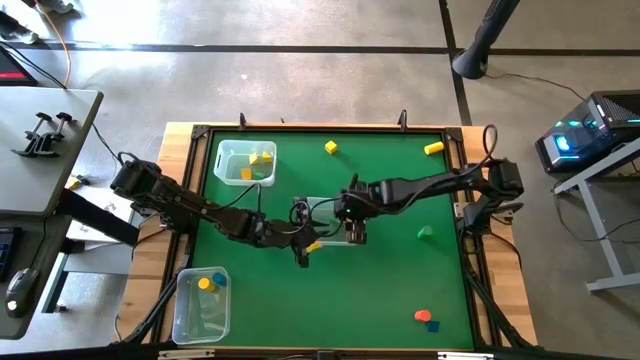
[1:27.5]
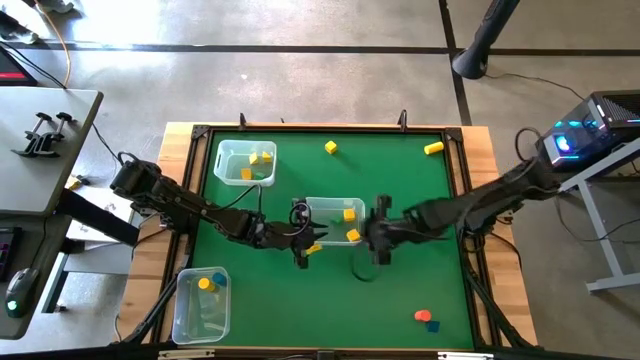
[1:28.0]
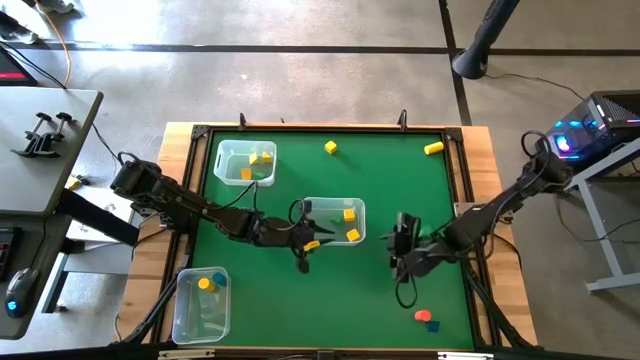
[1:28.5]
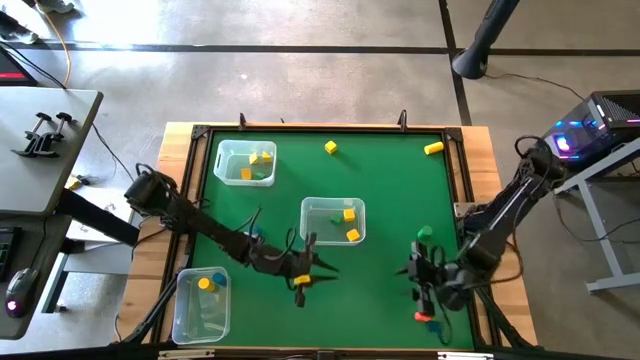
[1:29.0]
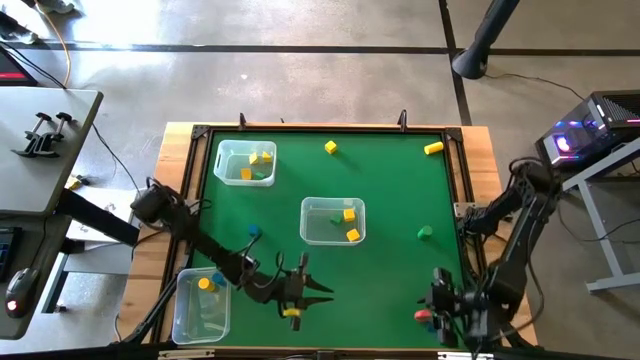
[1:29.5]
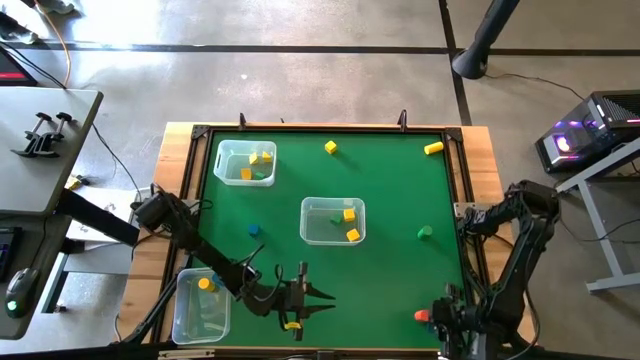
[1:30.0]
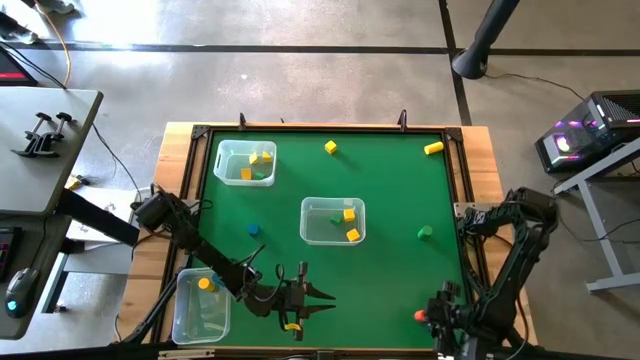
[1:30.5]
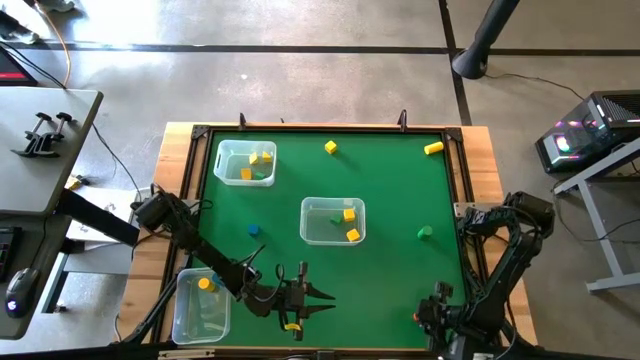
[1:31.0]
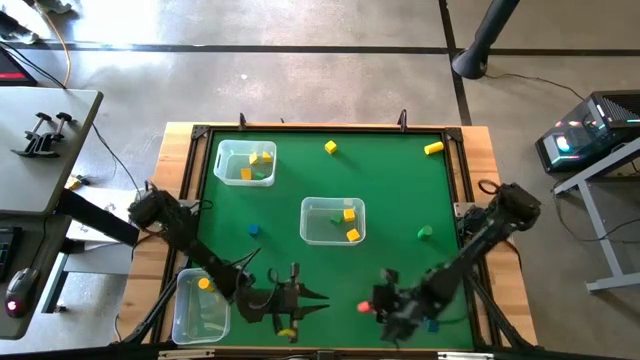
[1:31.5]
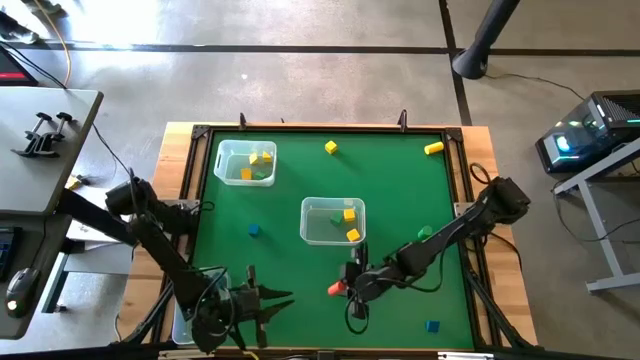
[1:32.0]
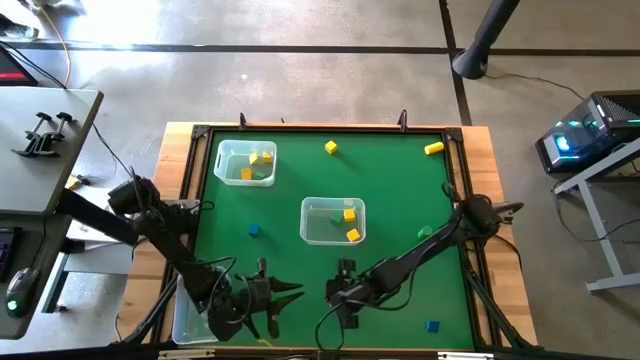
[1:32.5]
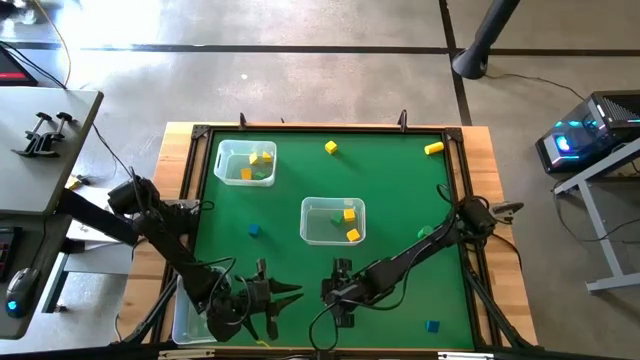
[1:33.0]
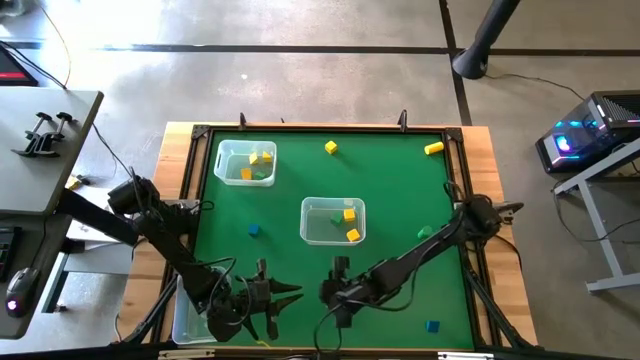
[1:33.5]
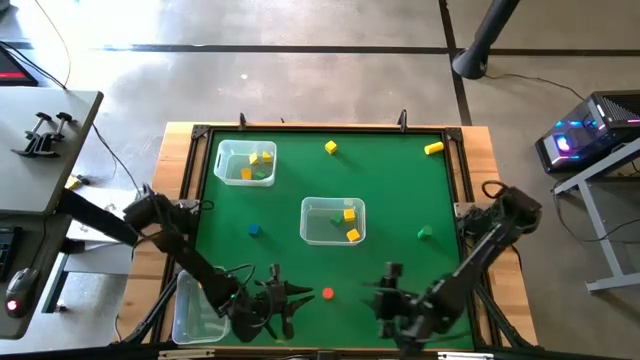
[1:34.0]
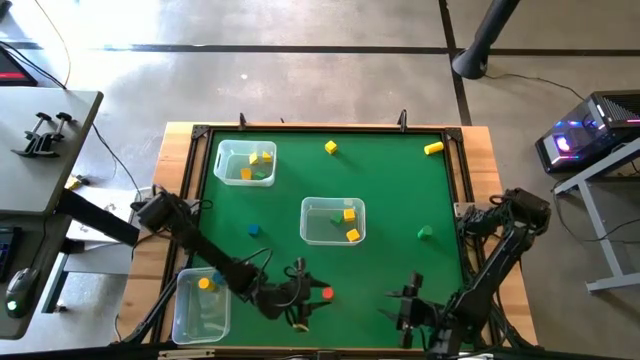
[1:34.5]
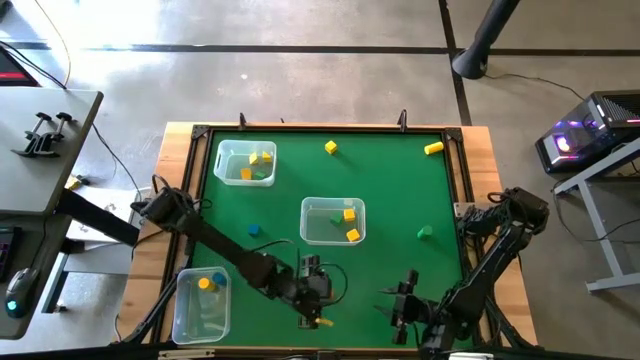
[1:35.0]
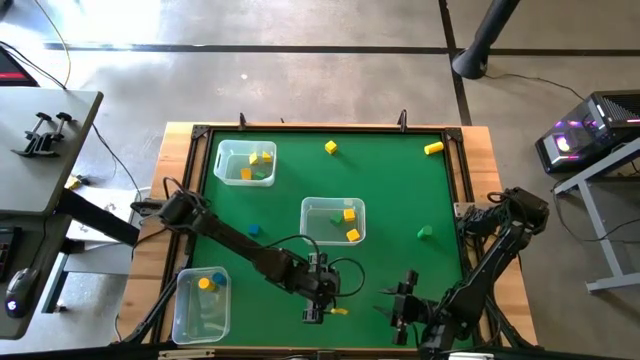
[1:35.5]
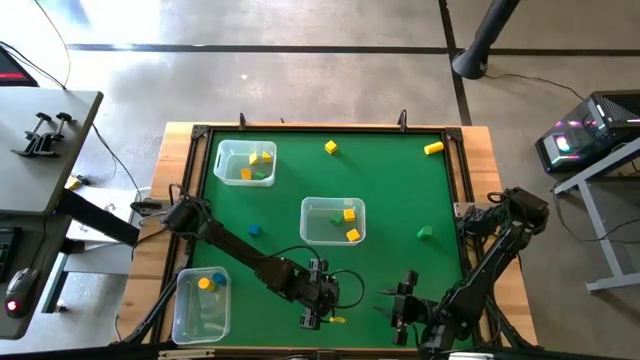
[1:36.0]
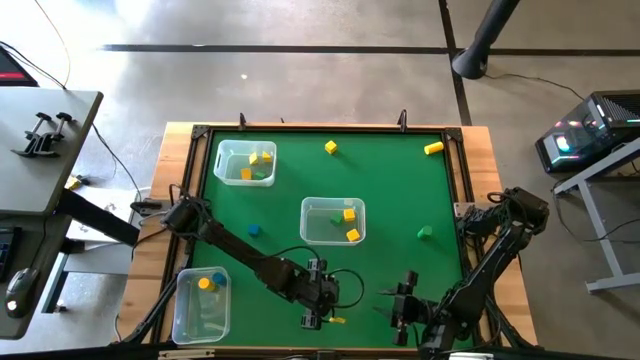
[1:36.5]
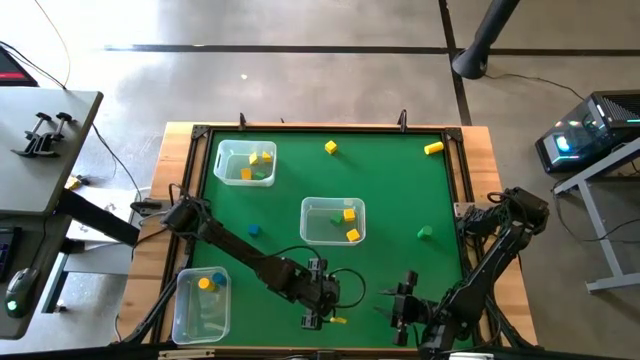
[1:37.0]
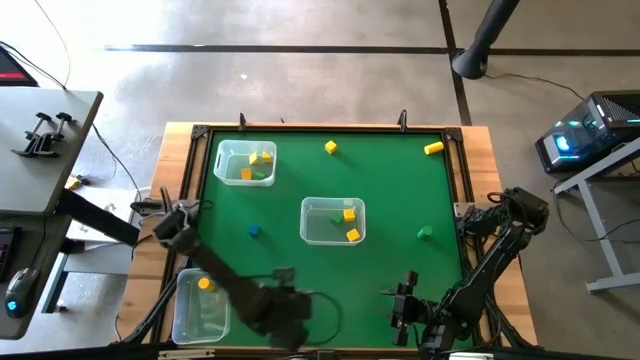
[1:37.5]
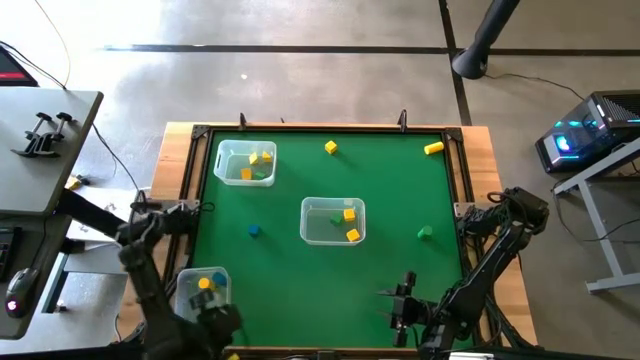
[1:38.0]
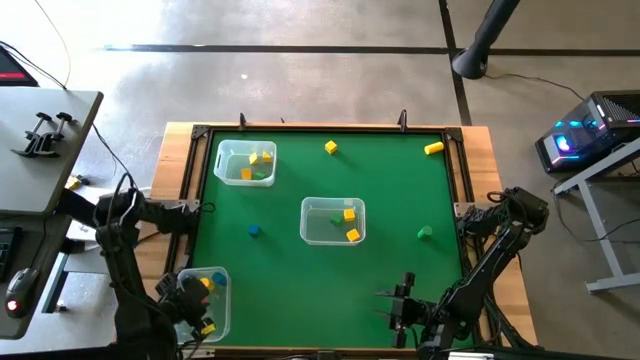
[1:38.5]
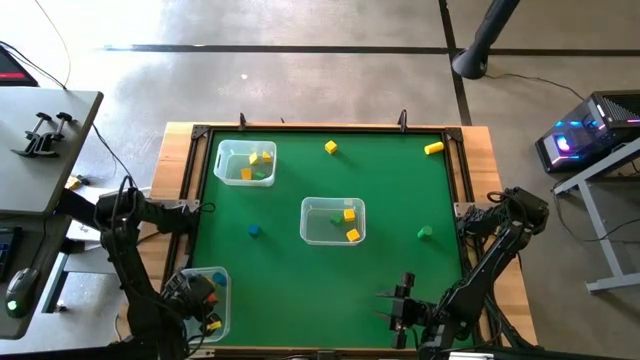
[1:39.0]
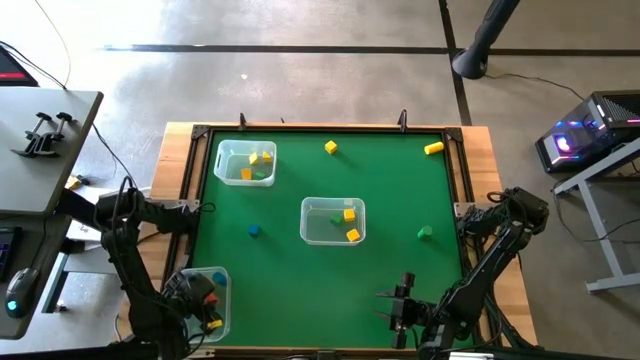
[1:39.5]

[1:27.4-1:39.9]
Task: Sort blocks by size
Put the orange cylindrical block into the bottom left transparent bin

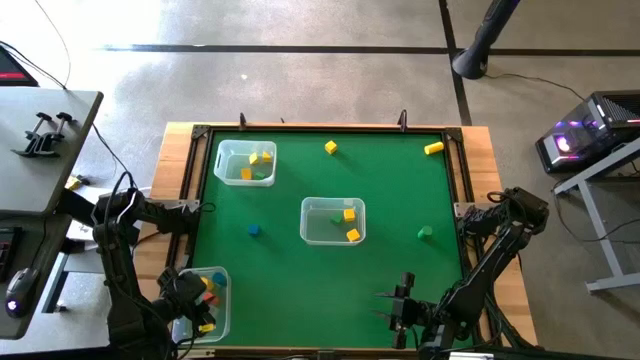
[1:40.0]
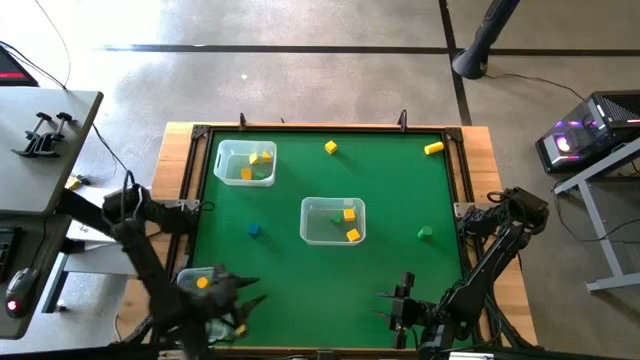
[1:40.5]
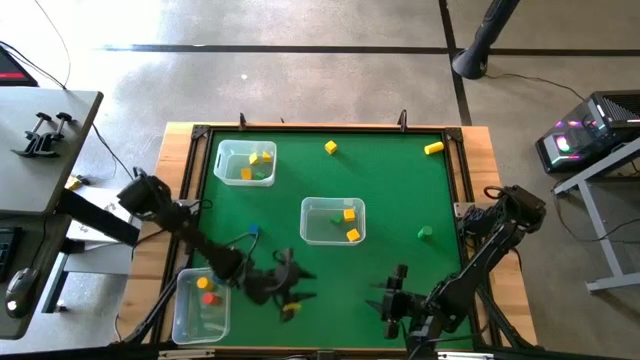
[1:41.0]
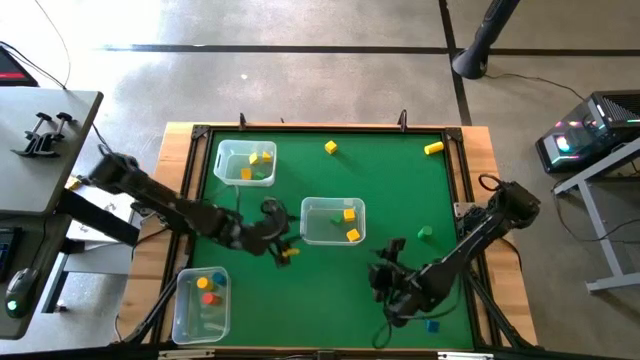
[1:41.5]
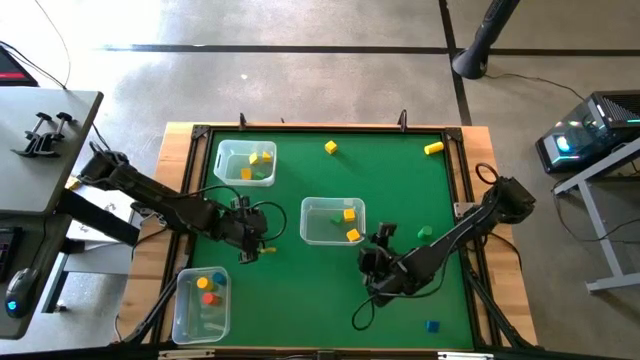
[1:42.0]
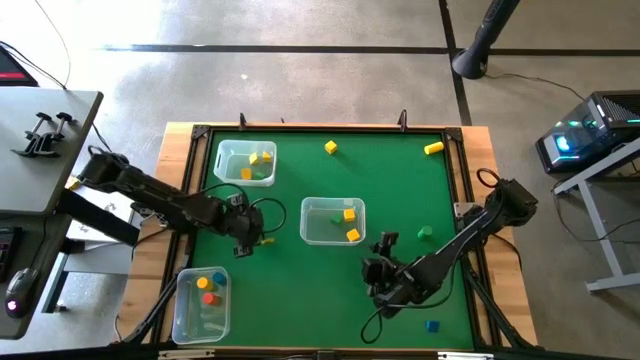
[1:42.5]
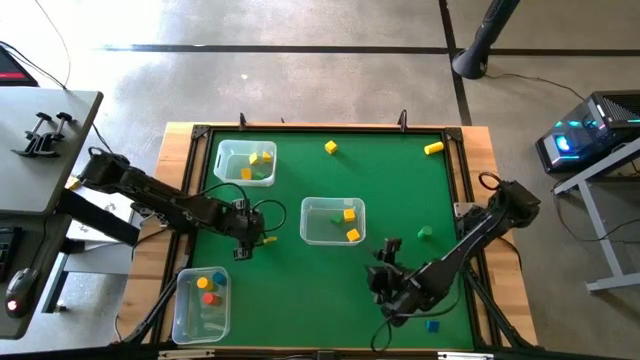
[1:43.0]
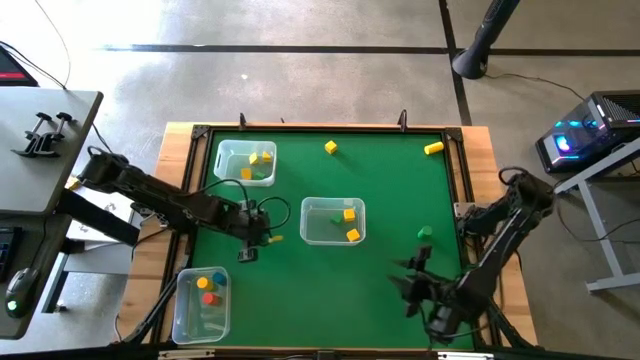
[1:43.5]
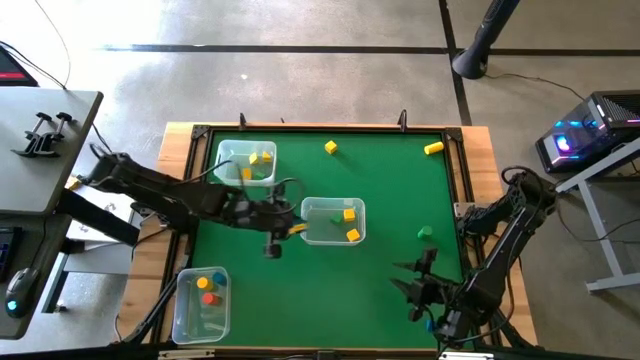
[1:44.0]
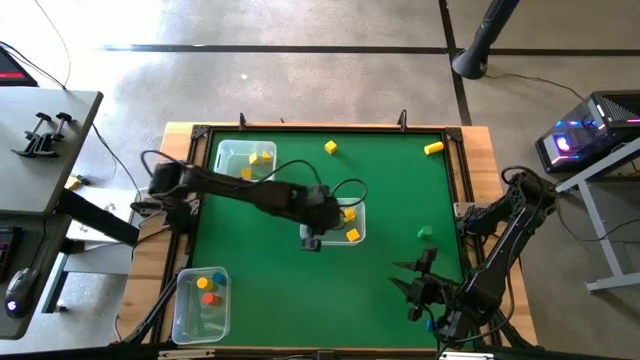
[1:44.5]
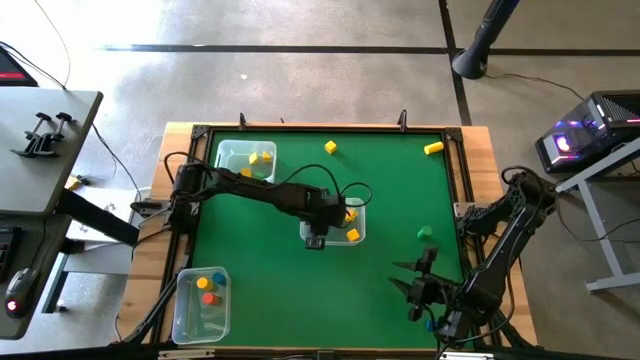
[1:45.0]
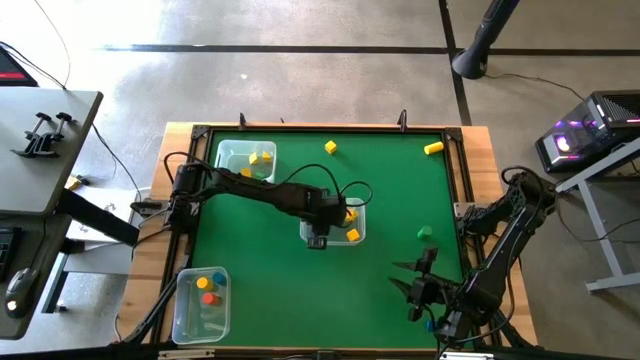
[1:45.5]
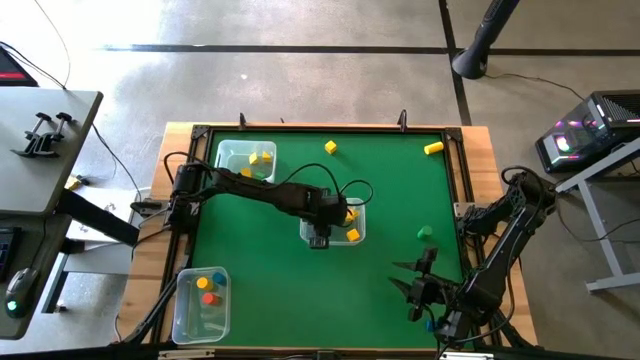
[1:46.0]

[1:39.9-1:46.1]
Put the blue cube block into the middle right transparent bin

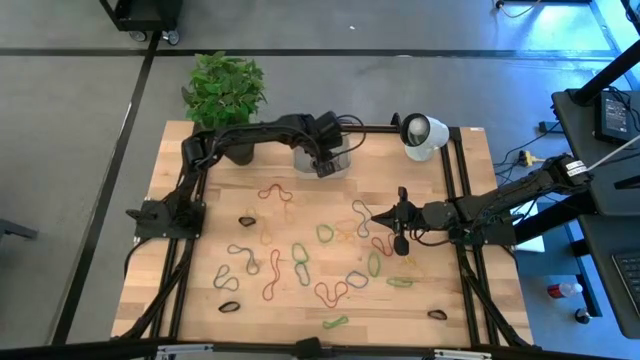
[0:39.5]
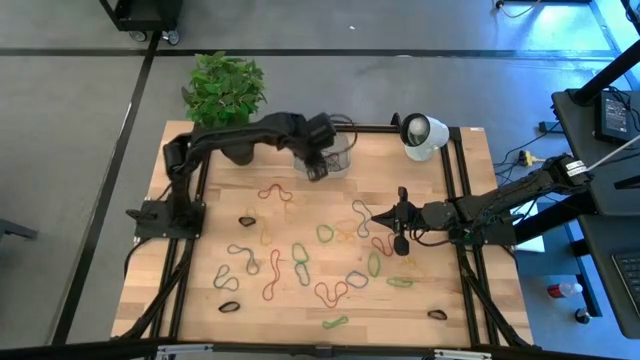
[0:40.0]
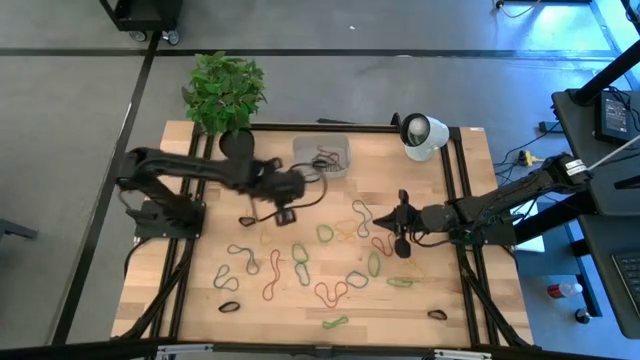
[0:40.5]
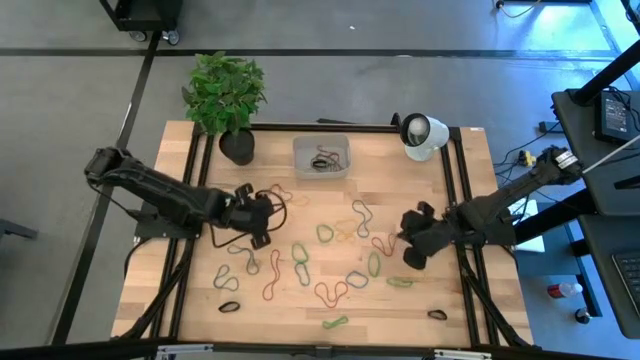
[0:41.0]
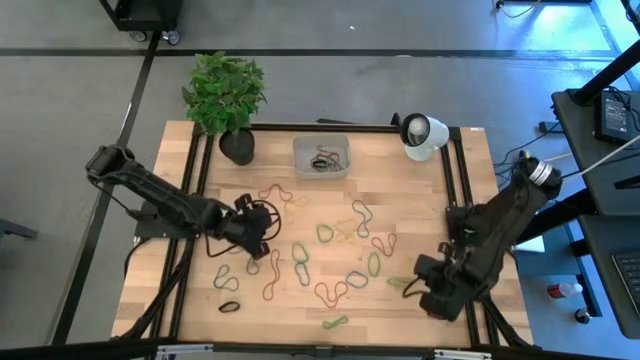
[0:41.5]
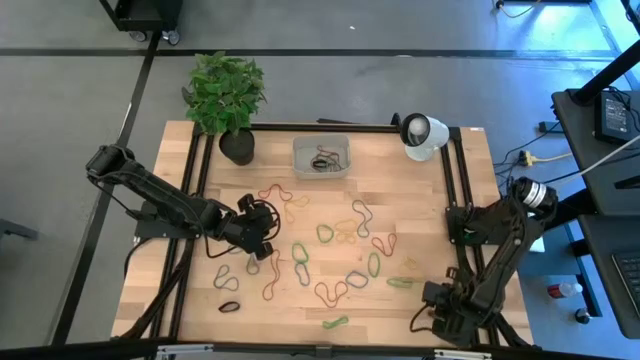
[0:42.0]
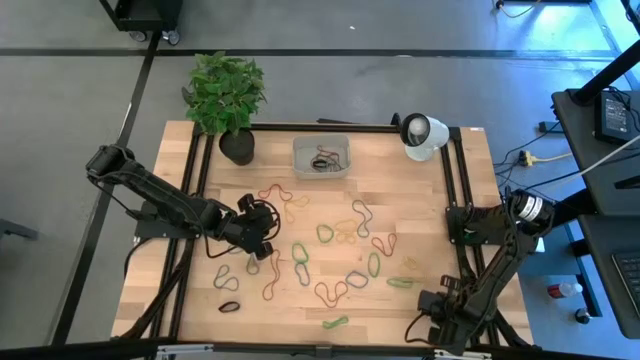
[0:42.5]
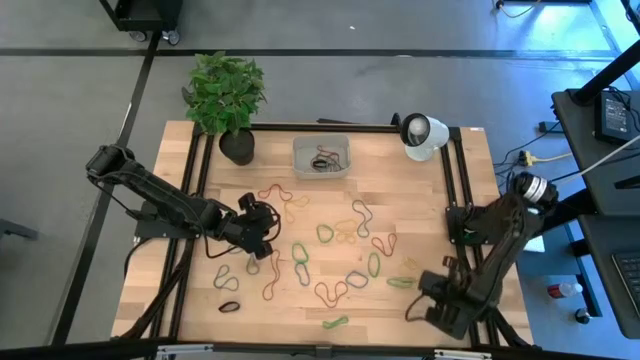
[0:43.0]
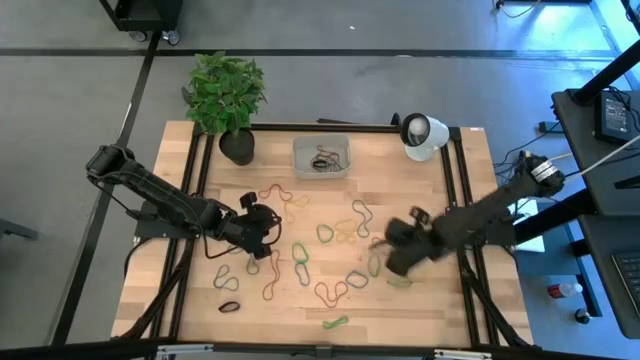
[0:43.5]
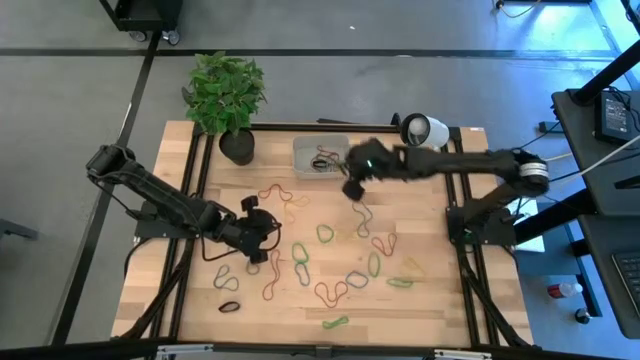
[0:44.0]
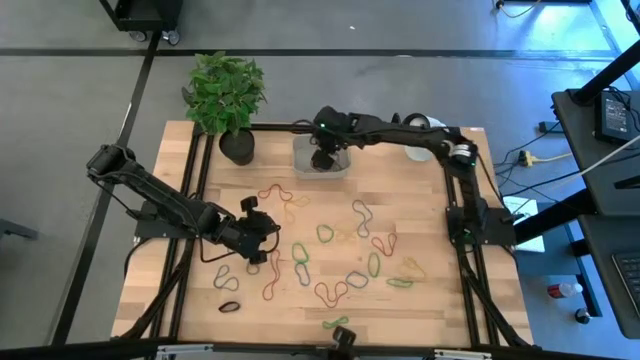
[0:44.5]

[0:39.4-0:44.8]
Task: Pick and place rubber bands into bin
Put the black rubber band into the gray bin
